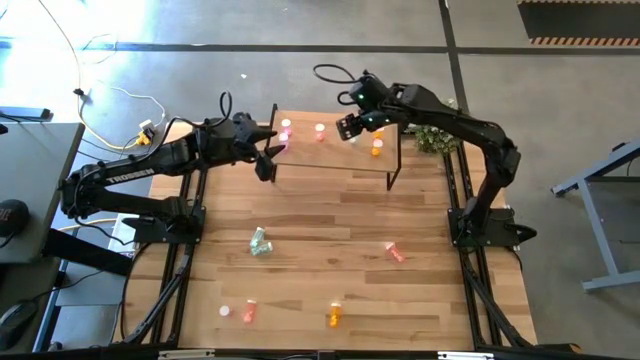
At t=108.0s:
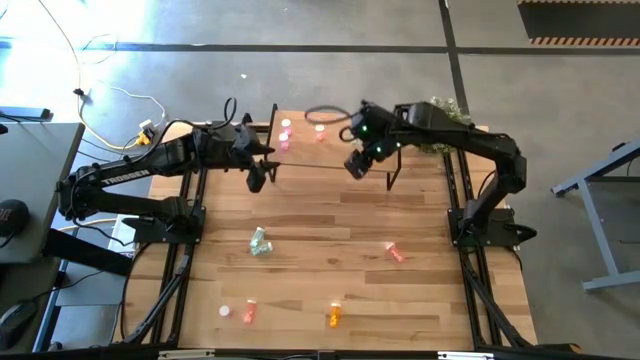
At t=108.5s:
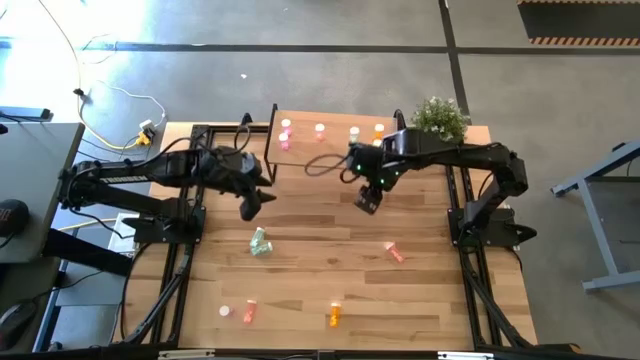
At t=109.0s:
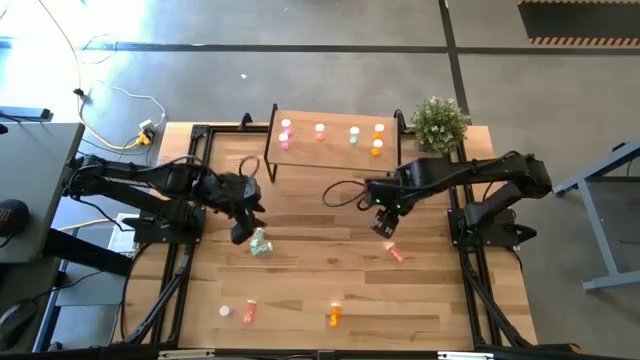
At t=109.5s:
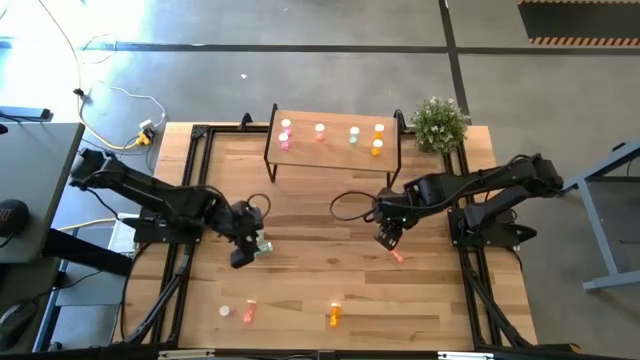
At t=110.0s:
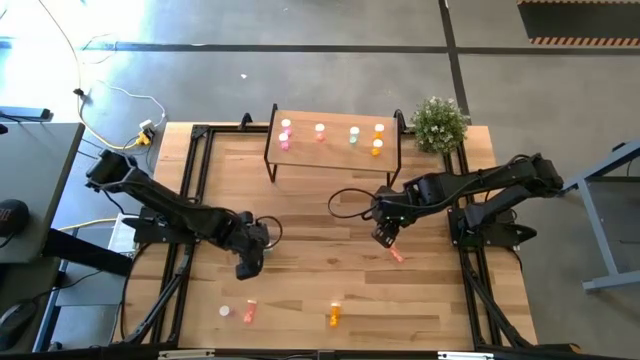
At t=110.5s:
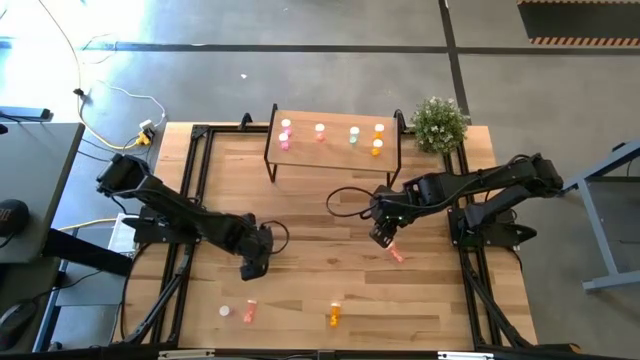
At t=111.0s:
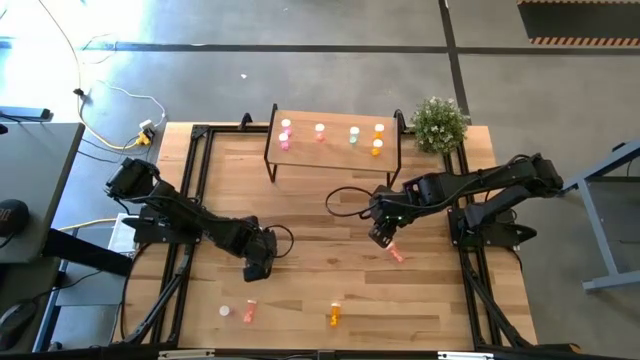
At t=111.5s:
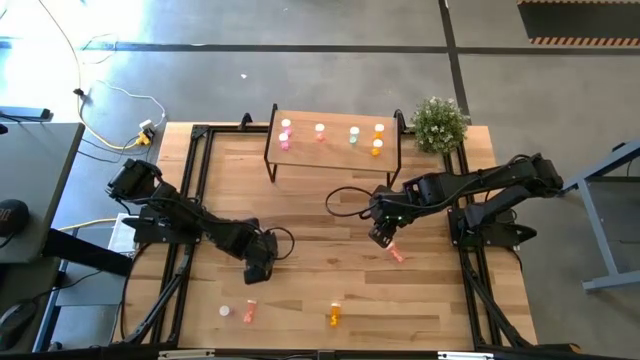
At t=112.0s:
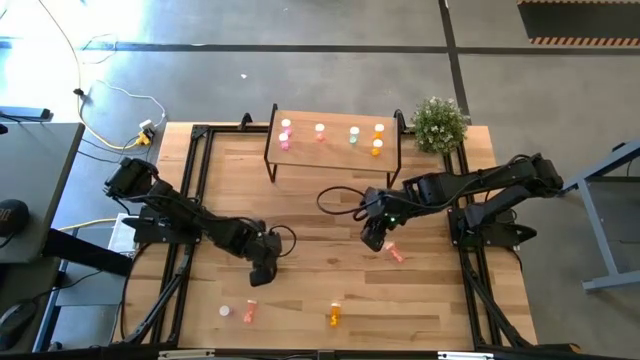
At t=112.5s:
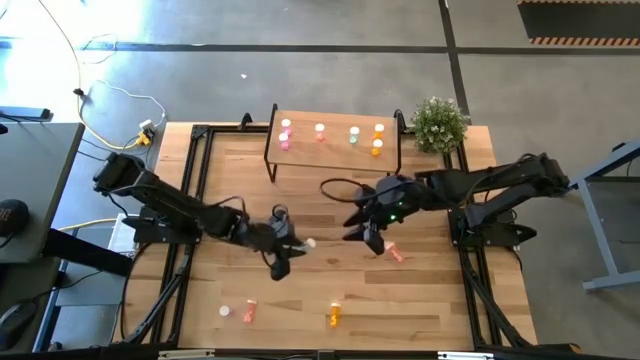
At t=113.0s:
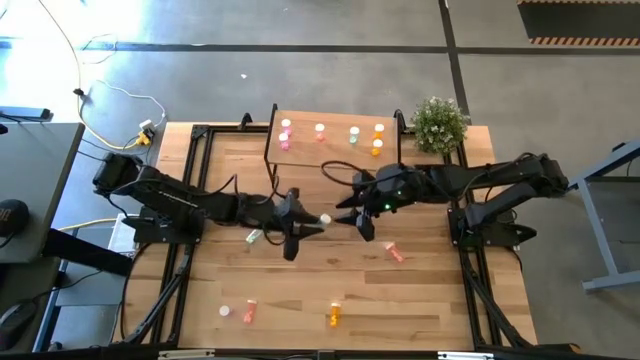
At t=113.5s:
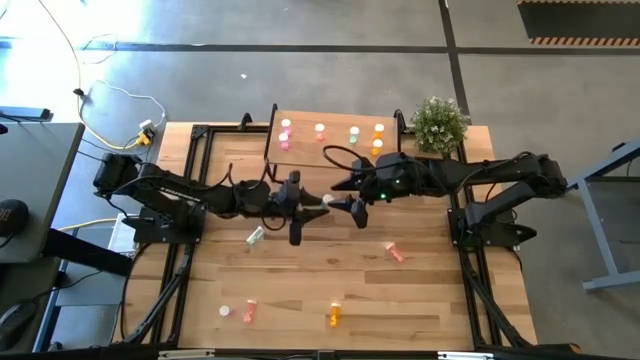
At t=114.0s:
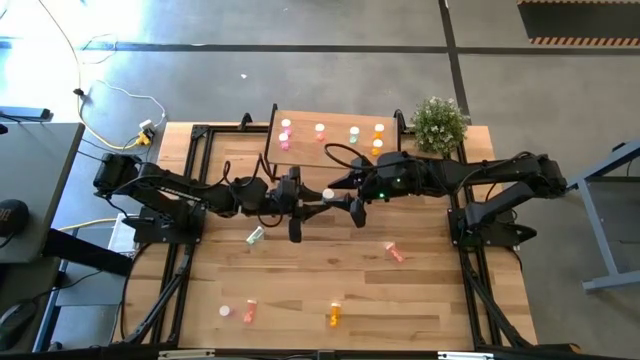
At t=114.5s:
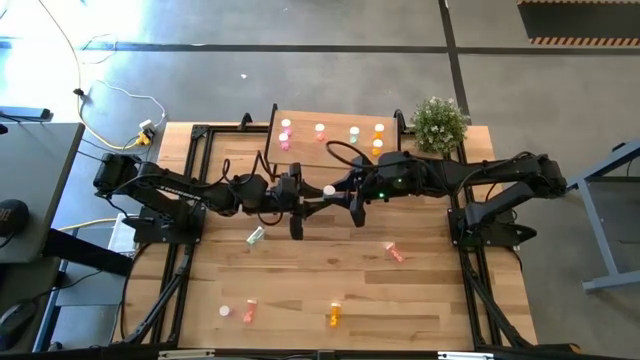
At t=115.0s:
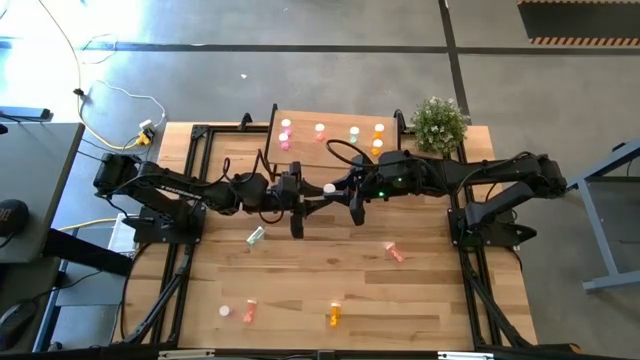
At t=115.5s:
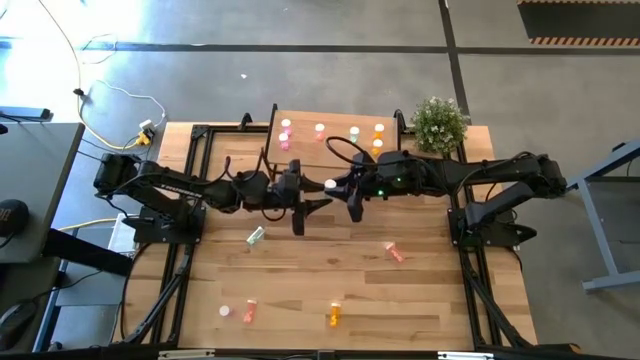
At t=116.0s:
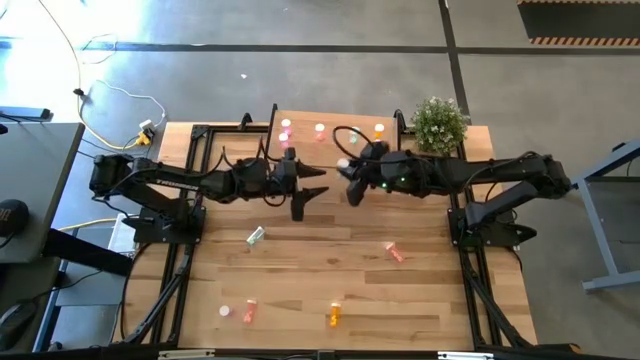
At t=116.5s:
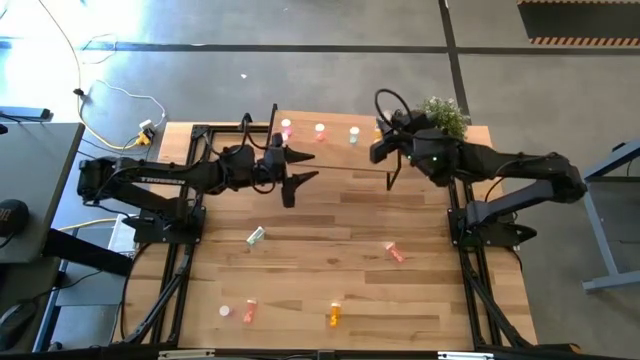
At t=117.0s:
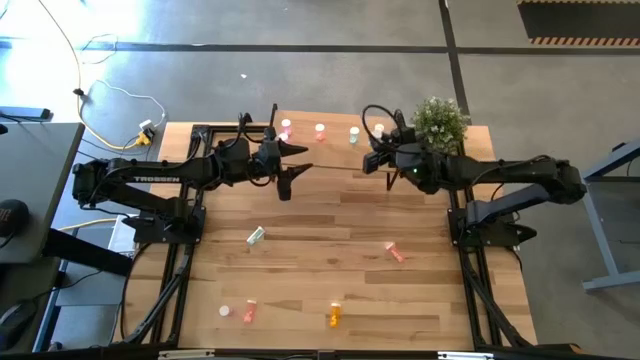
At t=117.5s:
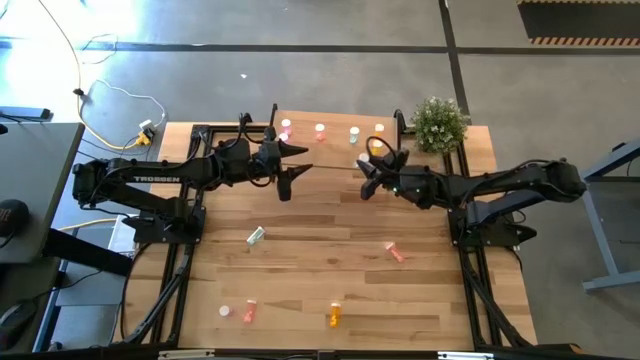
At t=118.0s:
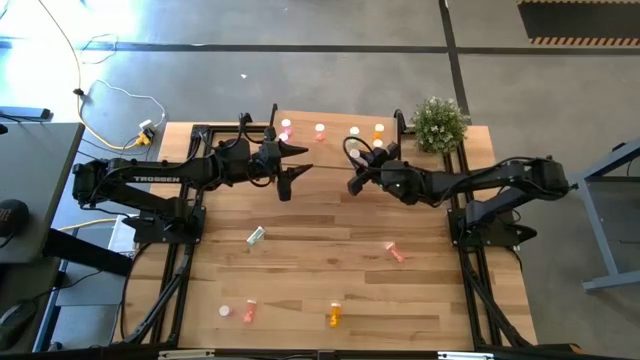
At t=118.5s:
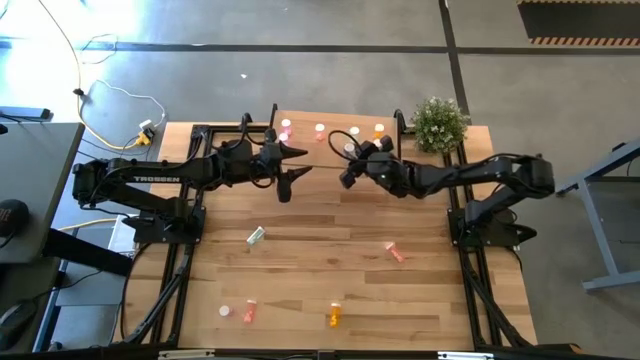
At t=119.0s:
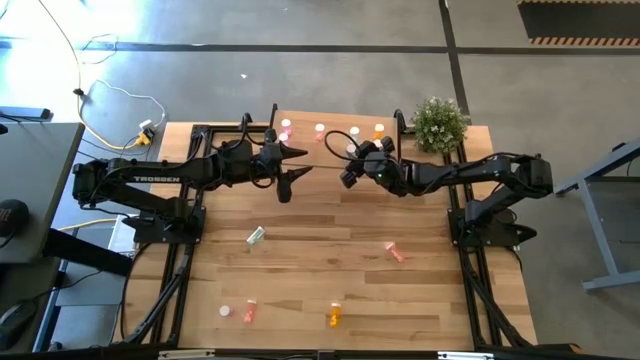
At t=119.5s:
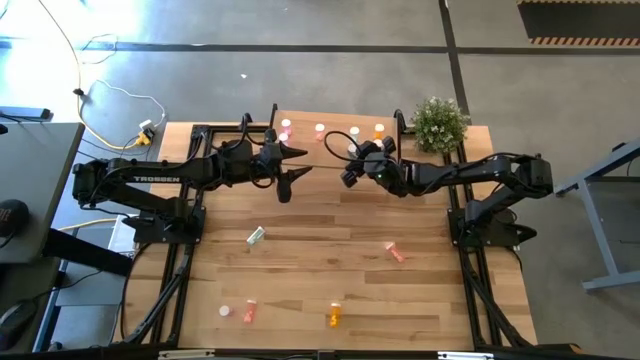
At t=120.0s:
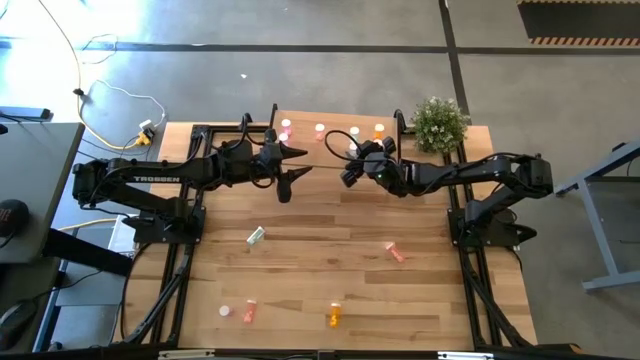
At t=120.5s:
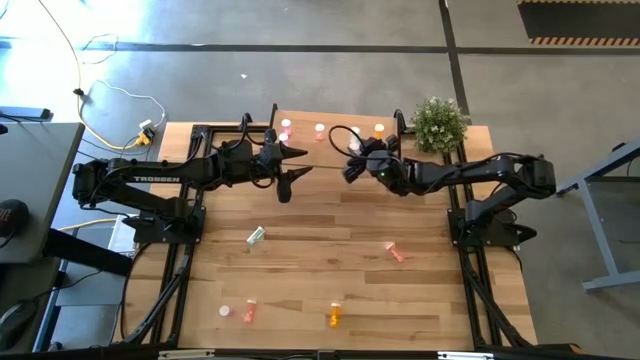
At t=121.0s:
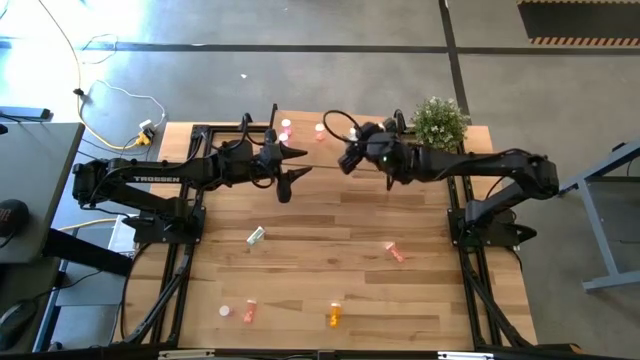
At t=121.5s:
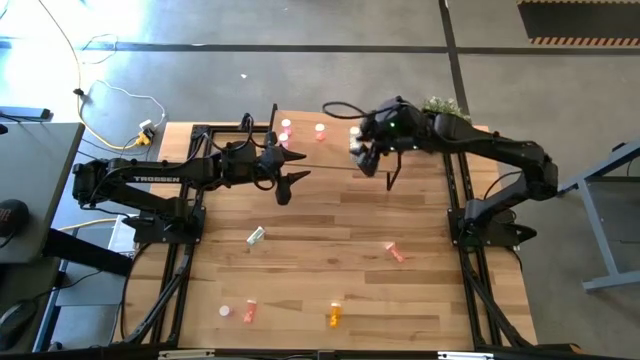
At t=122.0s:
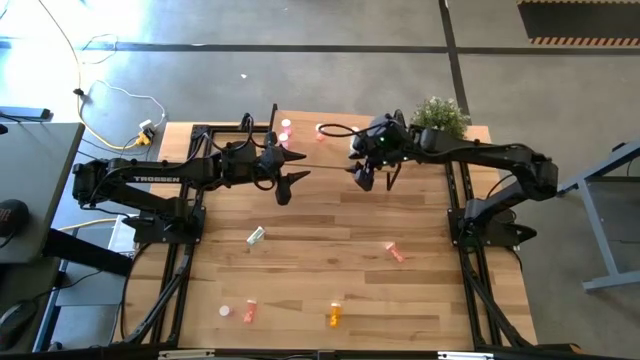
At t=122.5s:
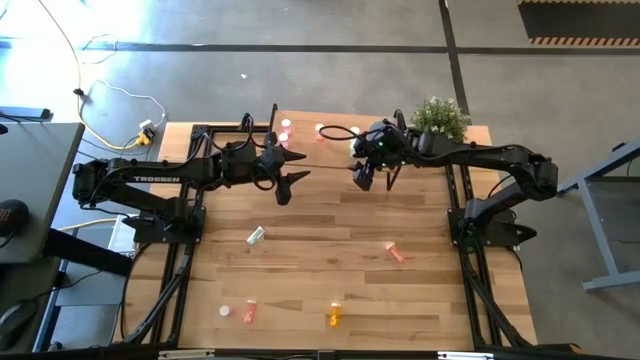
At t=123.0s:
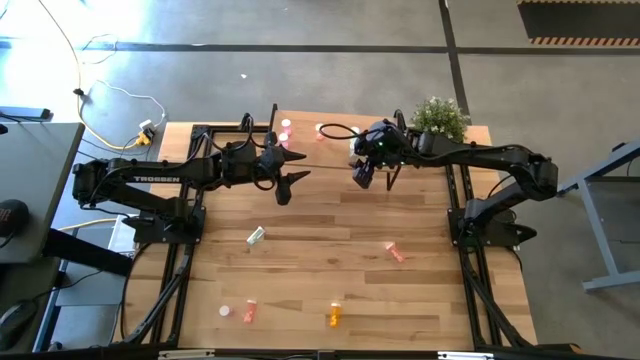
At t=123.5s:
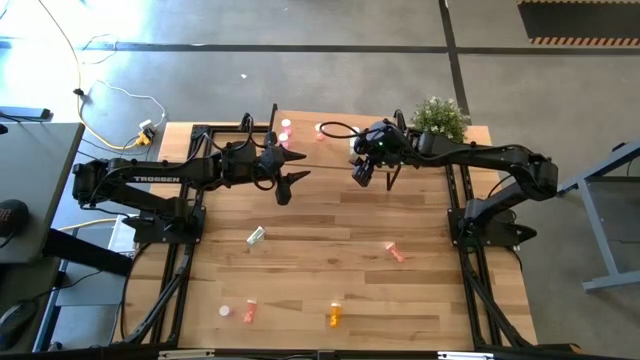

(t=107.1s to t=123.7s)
Task: Pick and place medicine bottles onto shelf by color
Put the bottom blue pill bottle aligned with the other blue pill bottle on the shelf

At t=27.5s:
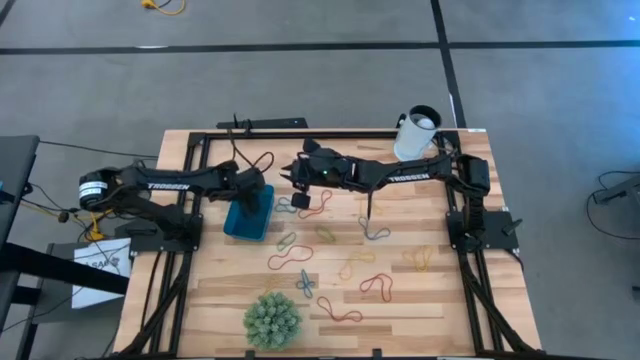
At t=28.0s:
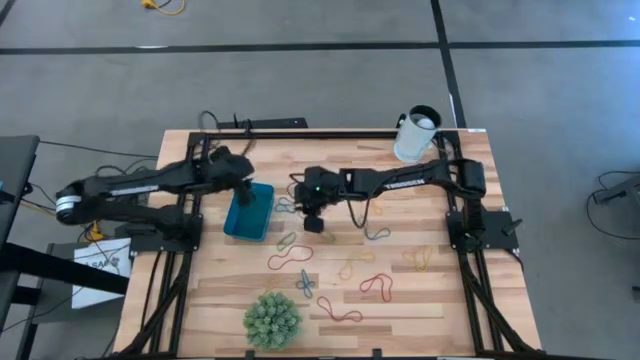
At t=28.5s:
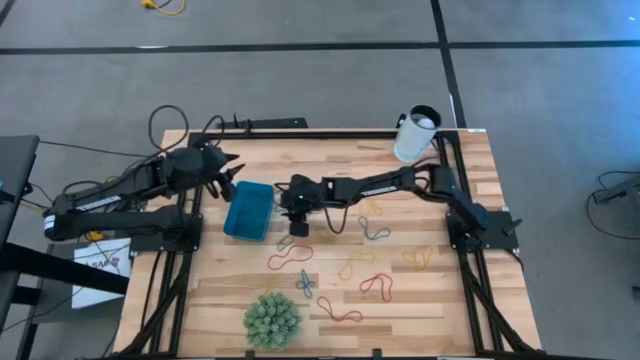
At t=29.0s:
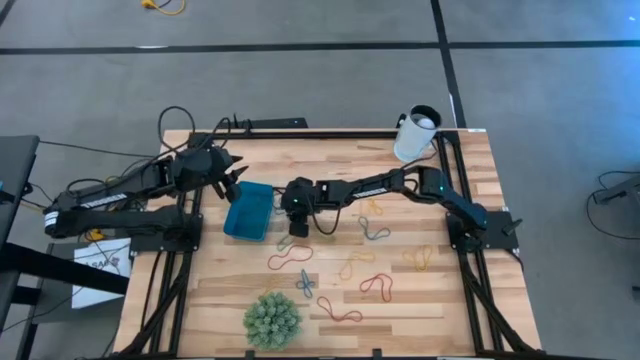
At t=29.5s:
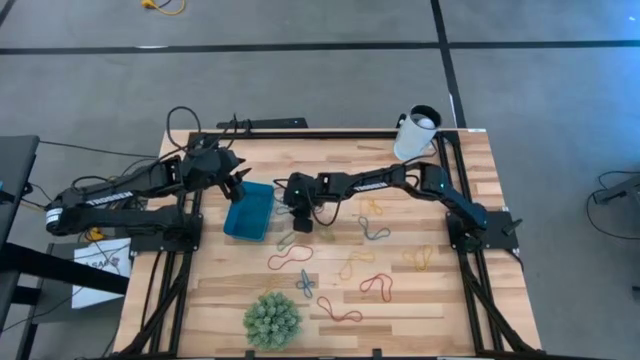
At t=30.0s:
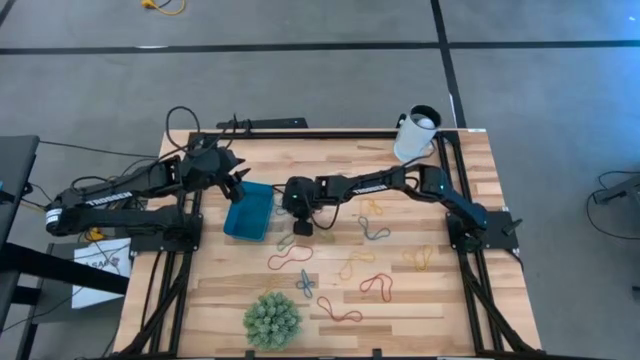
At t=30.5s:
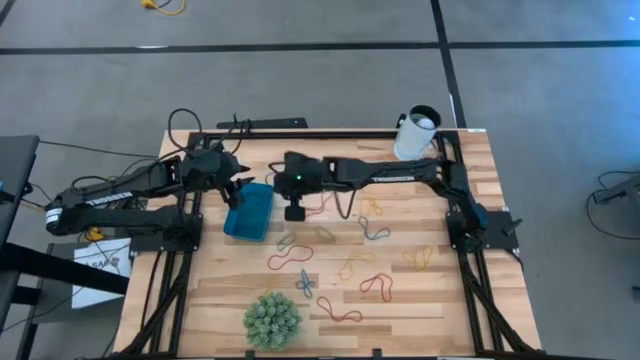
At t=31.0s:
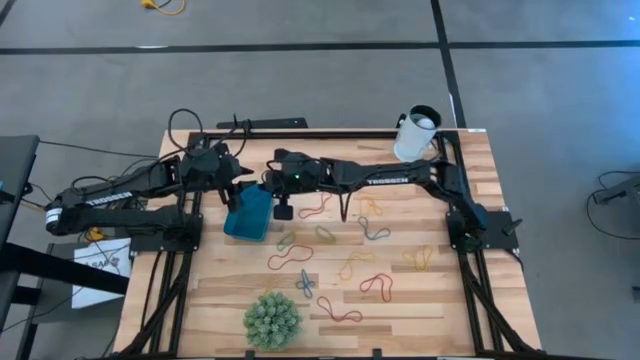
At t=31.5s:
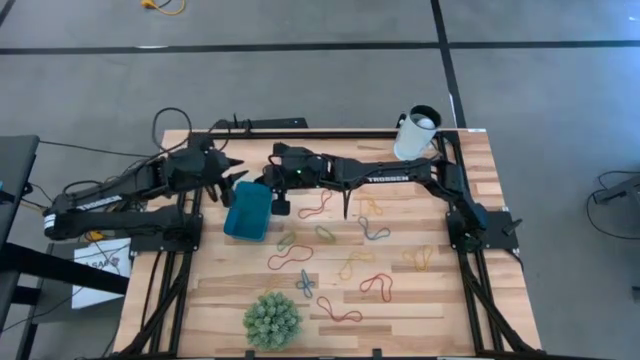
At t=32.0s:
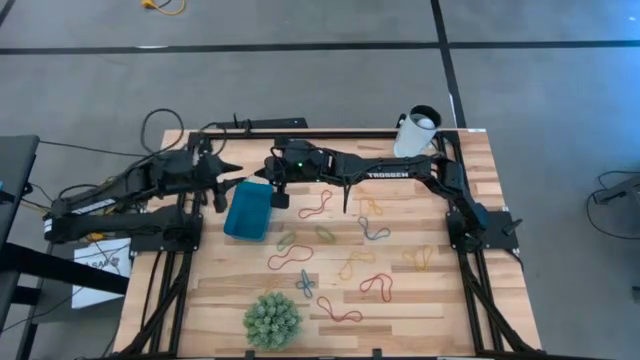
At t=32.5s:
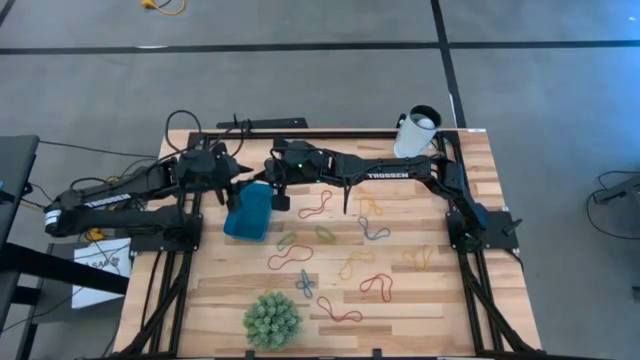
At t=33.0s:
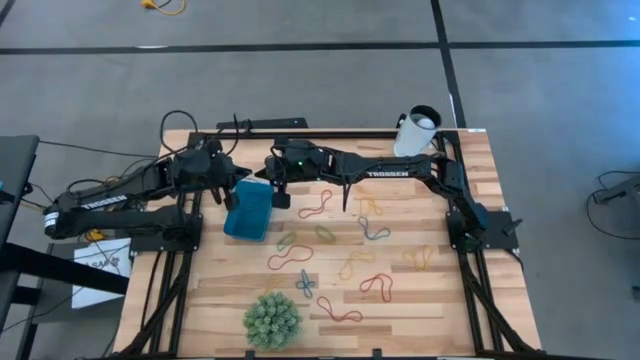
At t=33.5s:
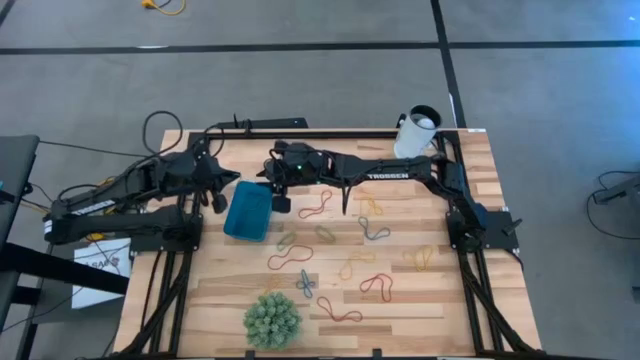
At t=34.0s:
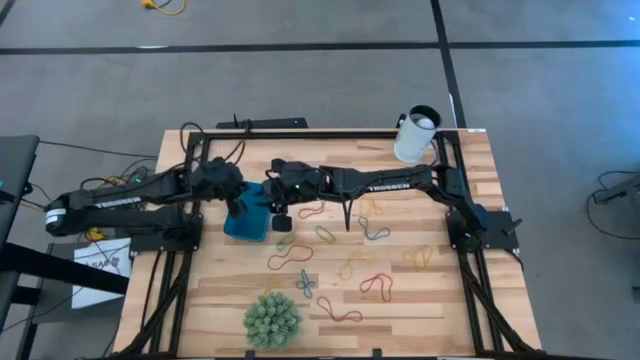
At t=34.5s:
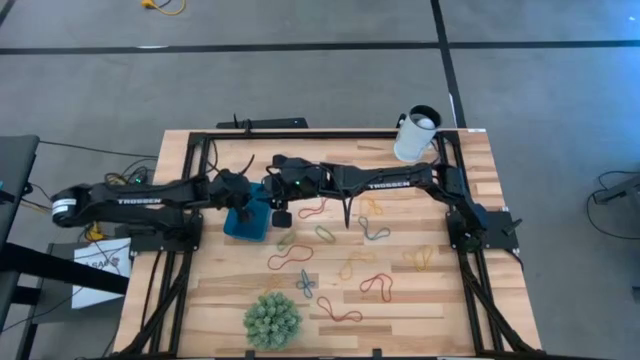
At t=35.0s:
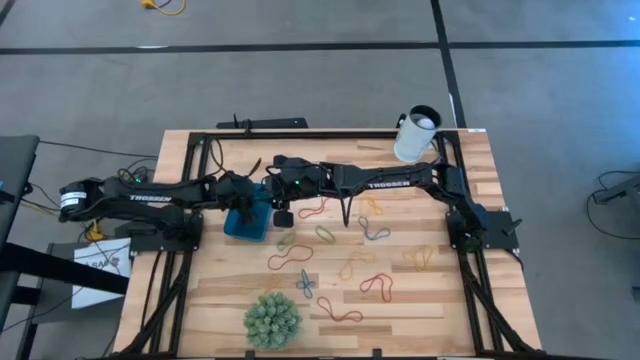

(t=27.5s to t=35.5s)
Task: Pick and place items into bin
Put the blue rubber band into the blue bin
